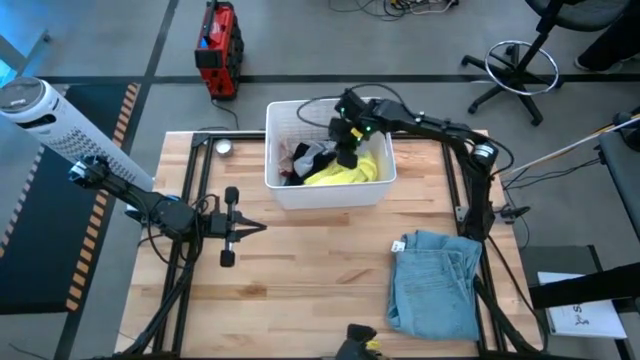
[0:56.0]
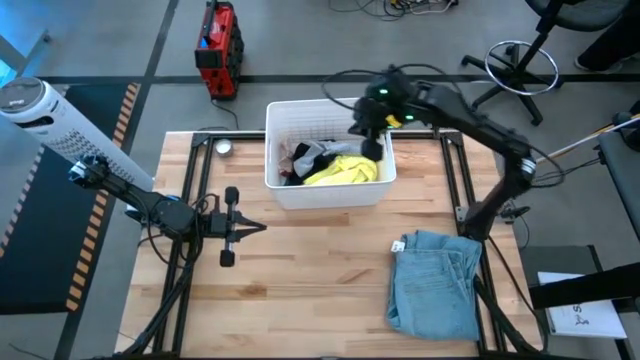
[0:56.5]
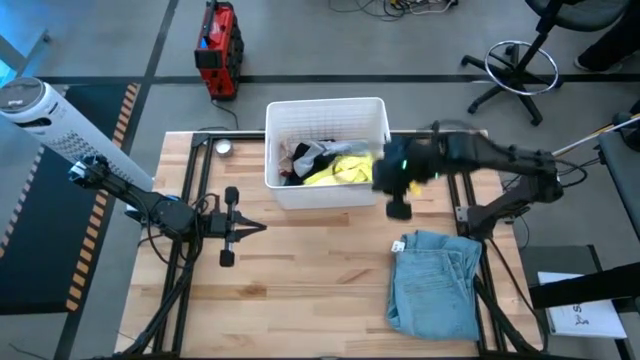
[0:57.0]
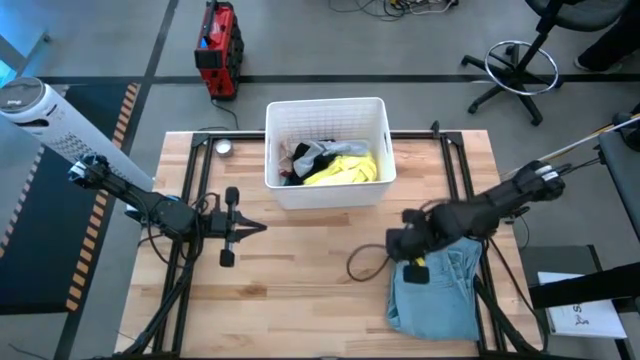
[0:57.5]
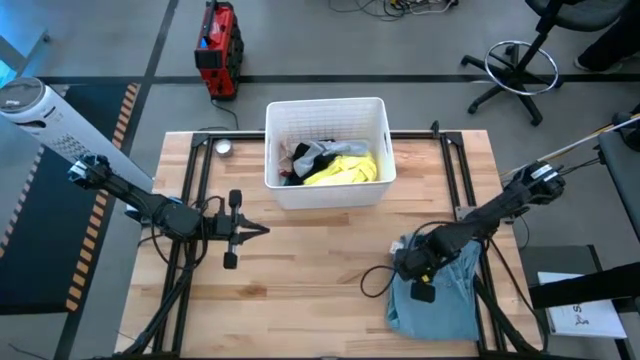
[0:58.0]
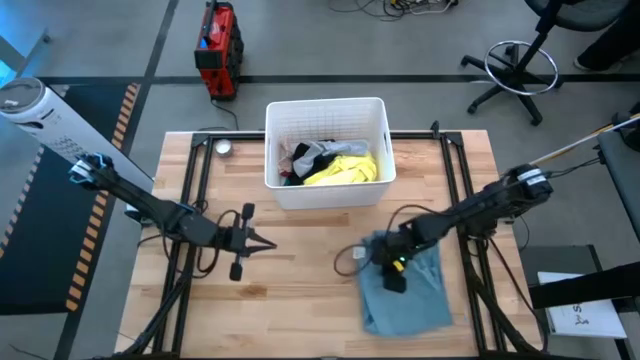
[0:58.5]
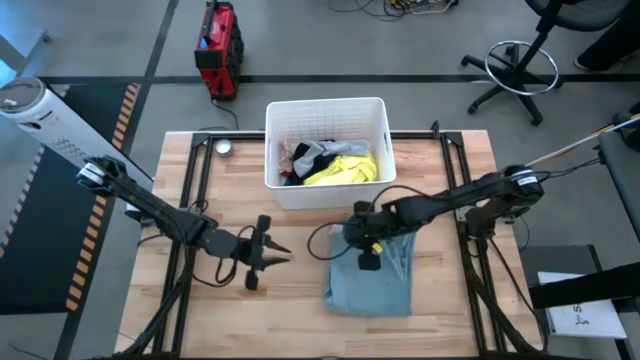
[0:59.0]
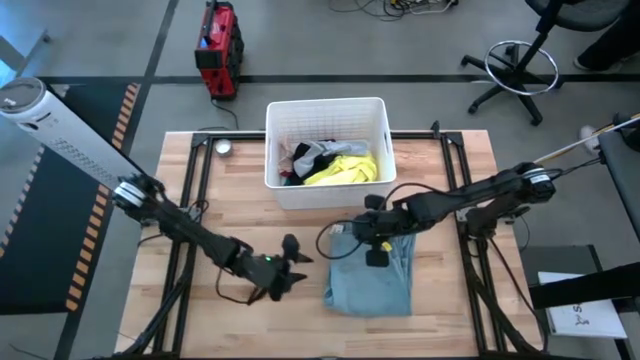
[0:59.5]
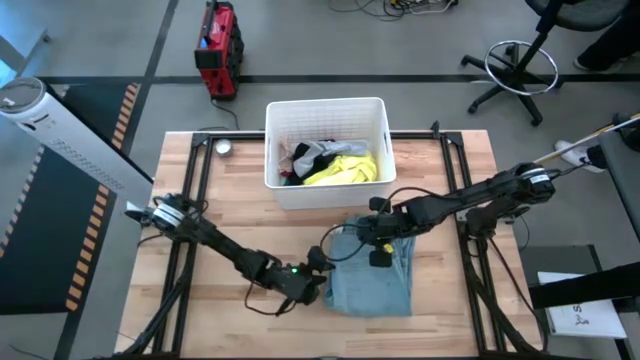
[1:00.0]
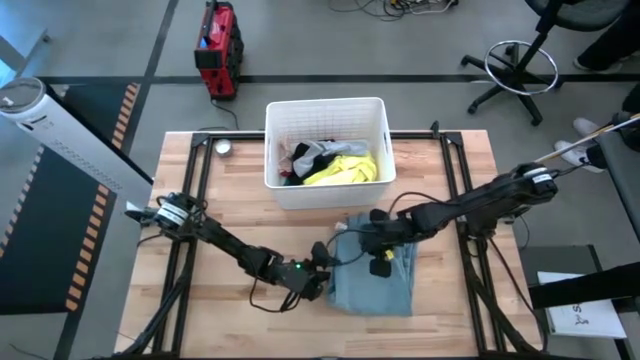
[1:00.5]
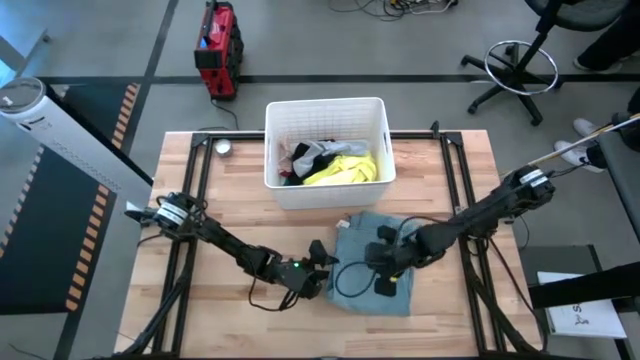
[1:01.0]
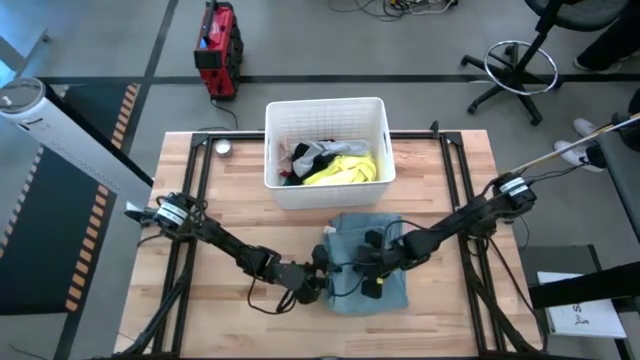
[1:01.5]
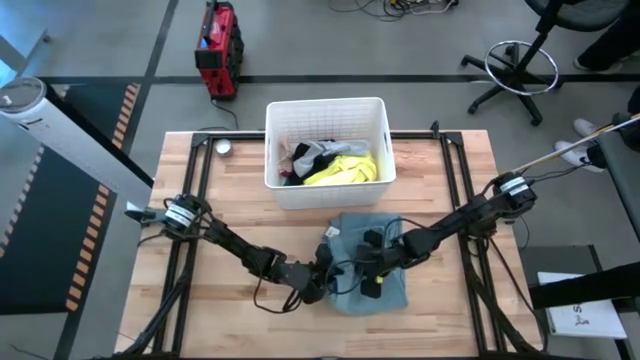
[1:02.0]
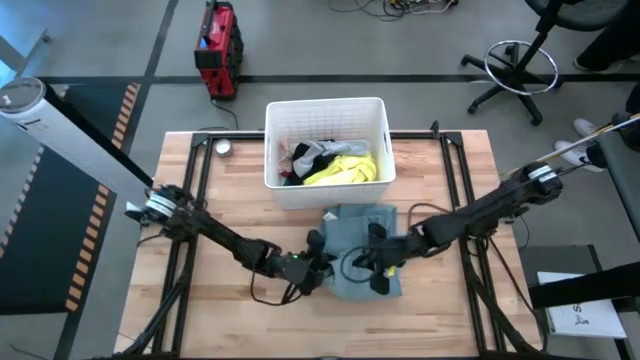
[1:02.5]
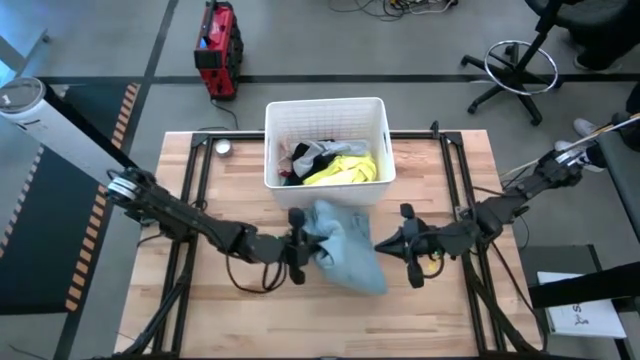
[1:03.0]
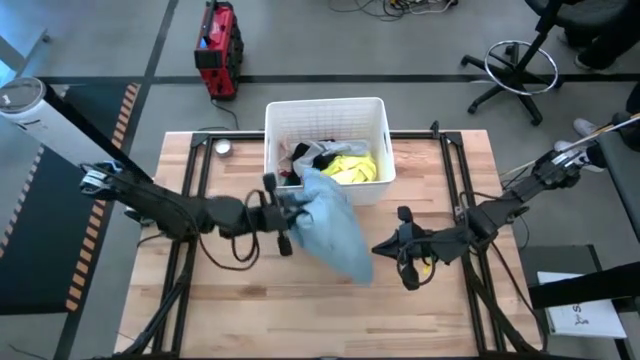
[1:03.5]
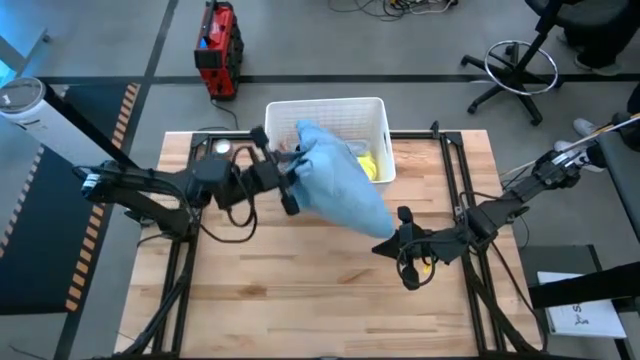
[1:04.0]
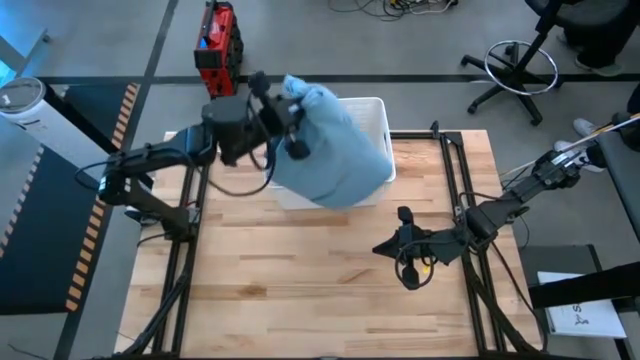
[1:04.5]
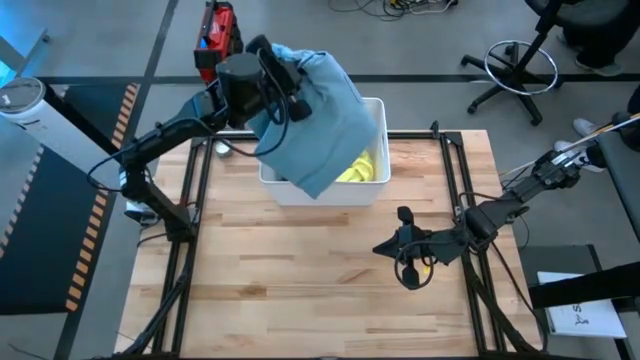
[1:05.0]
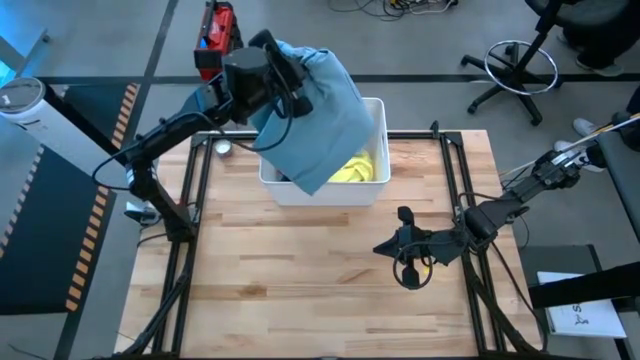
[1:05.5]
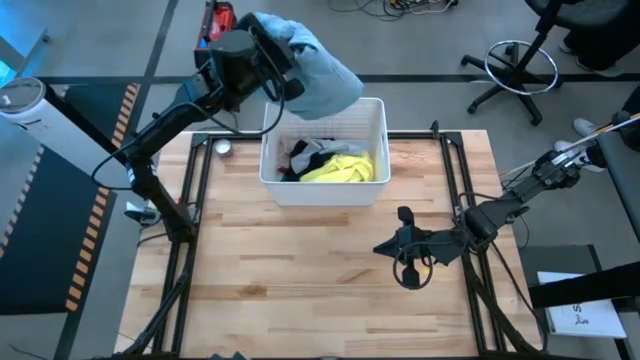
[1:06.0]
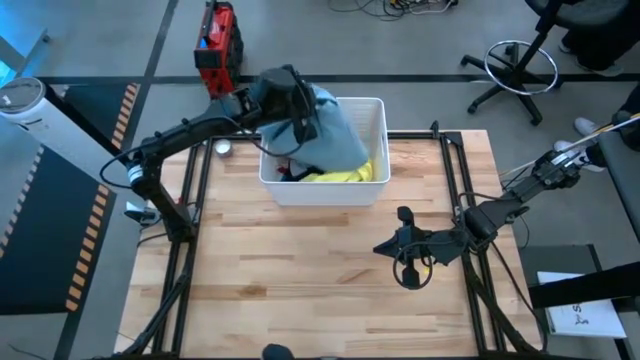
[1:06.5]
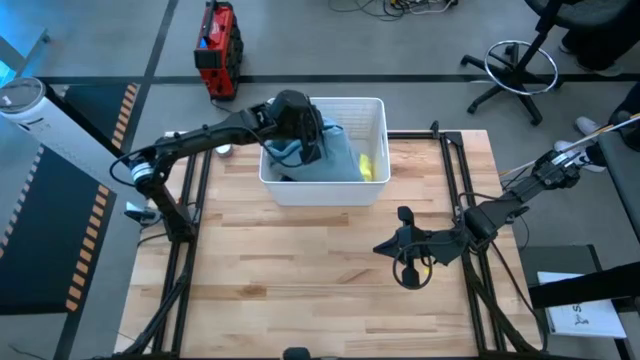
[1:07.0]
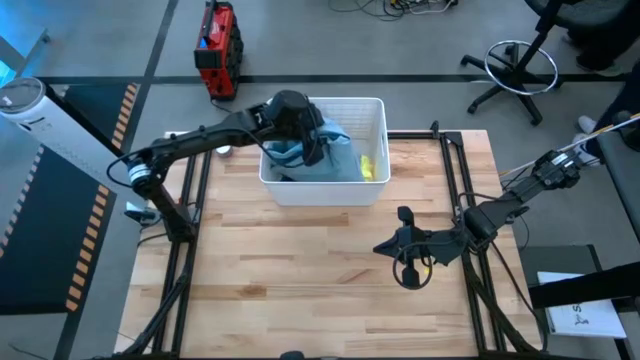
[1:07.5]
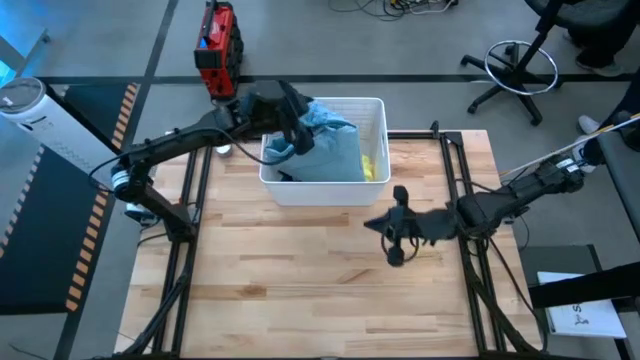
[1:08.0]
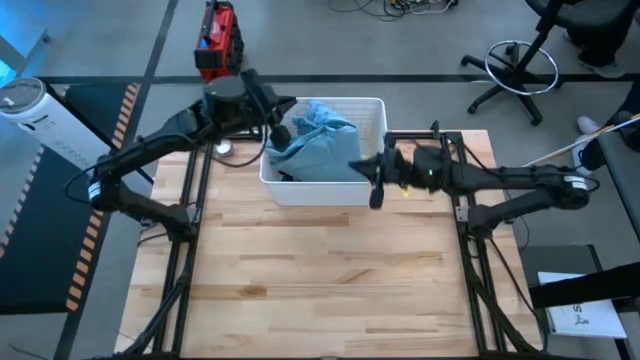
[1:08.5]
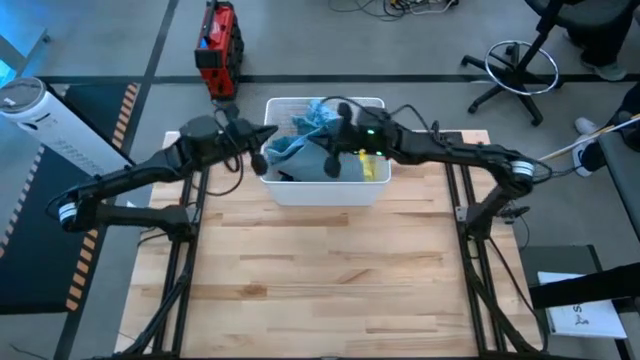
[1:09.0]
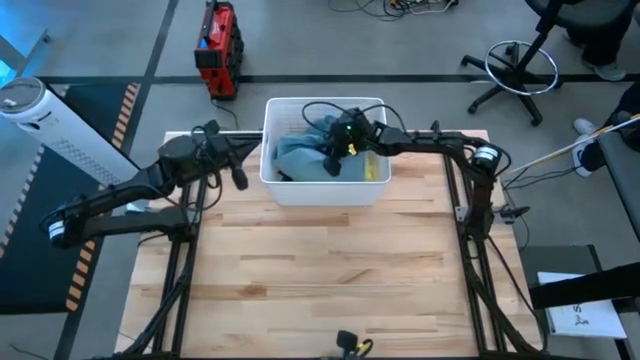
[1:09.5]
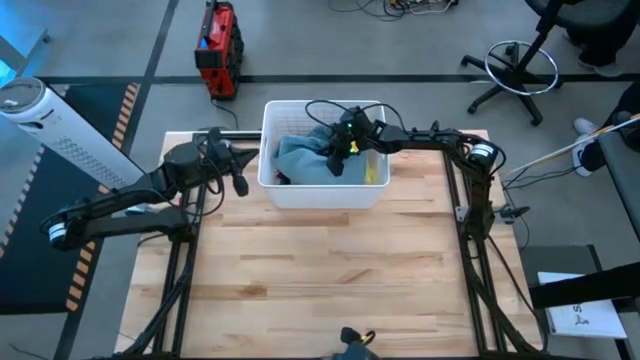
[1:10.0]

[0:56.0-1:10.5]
Task: Sort clothes
Put the blue jeans into the white laundry bin

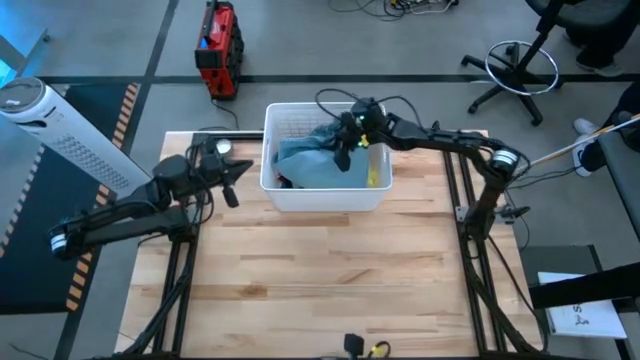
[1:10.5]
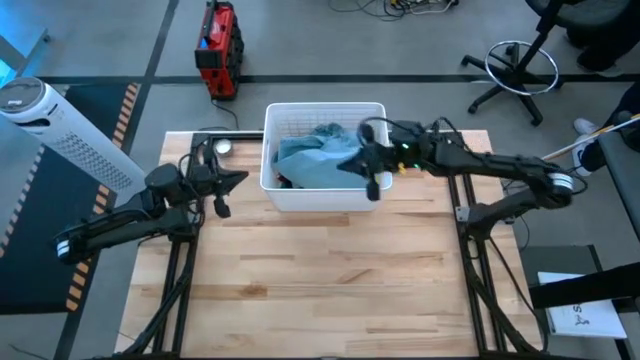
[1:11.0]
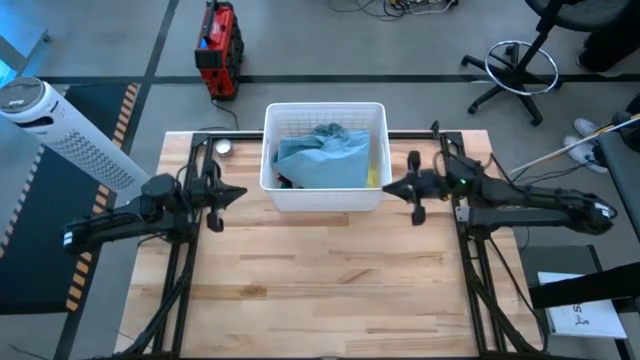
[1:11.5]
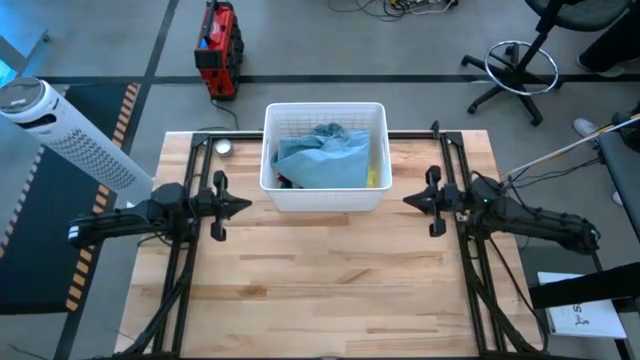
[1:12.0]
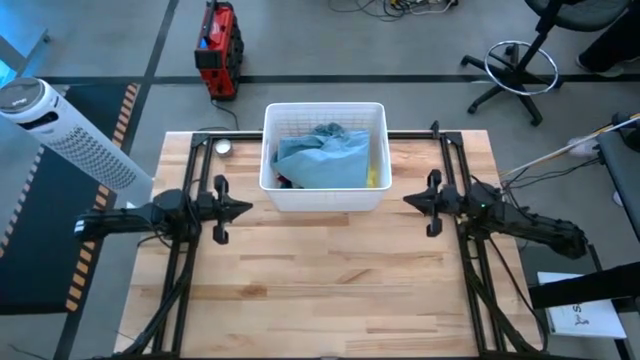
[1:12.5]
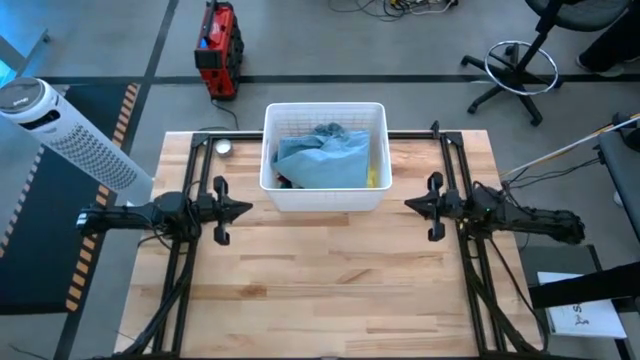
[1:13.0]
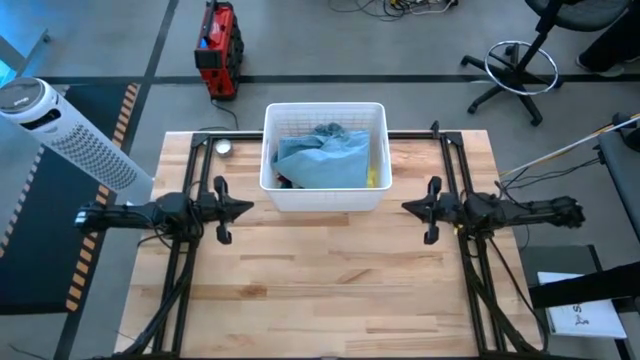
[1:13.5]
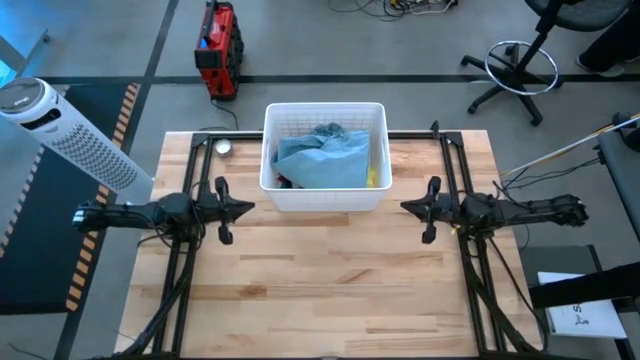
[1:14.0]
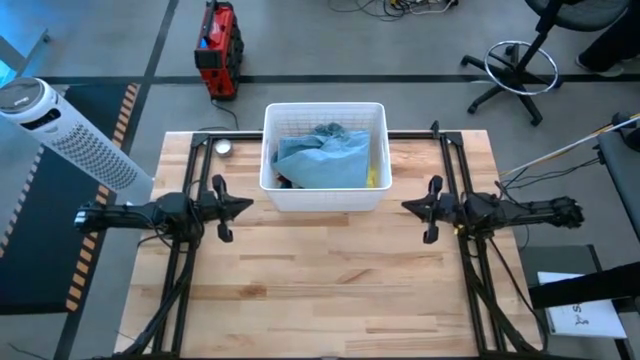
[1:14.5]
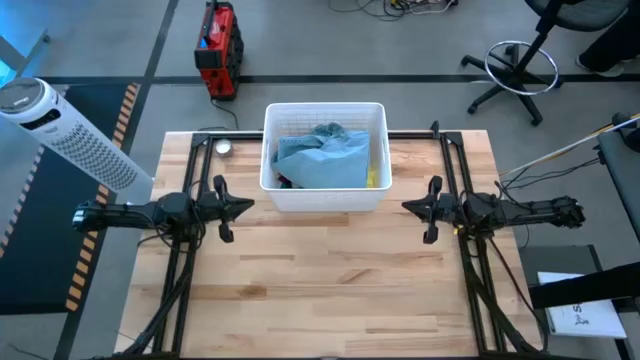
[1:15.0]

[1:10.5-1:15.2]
Return to Home Position
